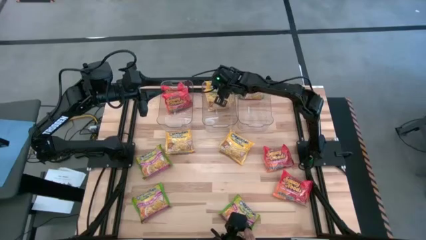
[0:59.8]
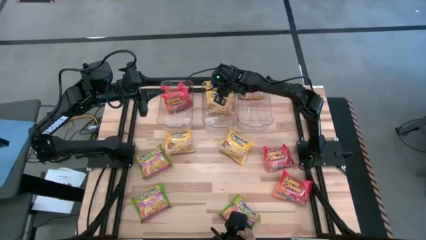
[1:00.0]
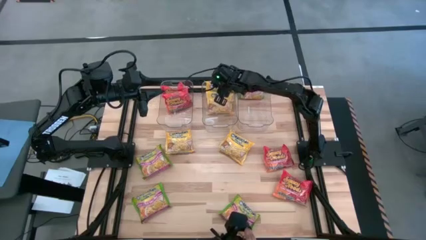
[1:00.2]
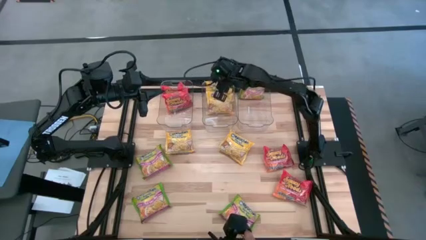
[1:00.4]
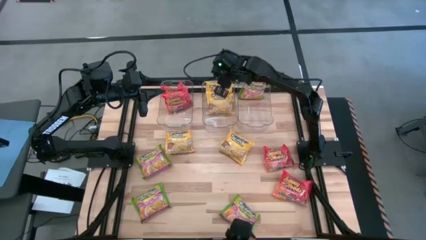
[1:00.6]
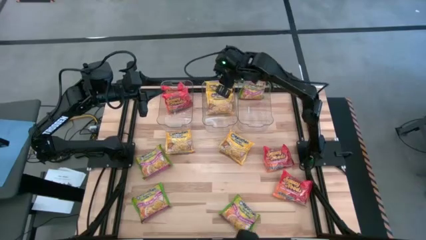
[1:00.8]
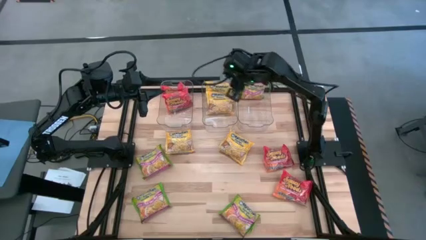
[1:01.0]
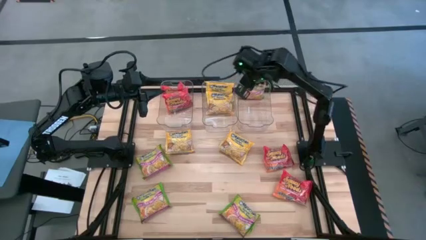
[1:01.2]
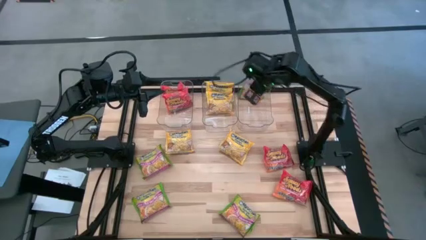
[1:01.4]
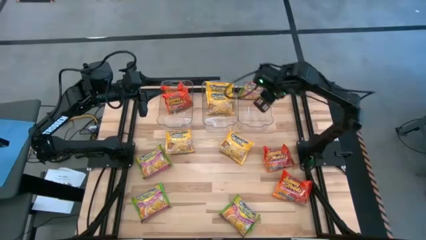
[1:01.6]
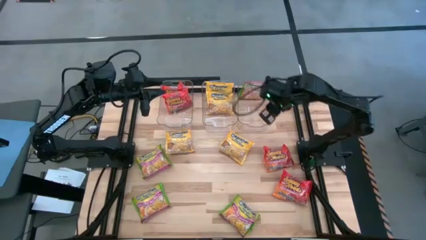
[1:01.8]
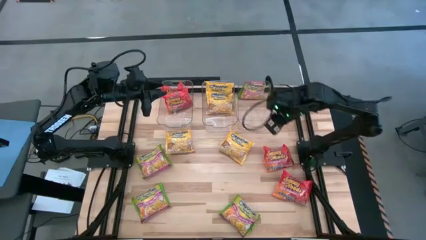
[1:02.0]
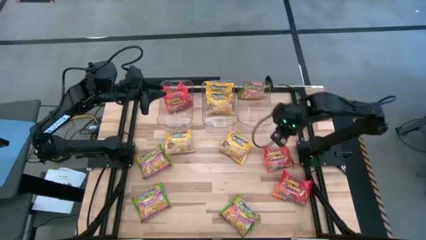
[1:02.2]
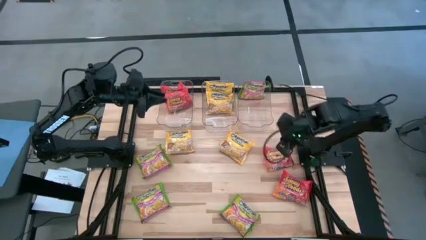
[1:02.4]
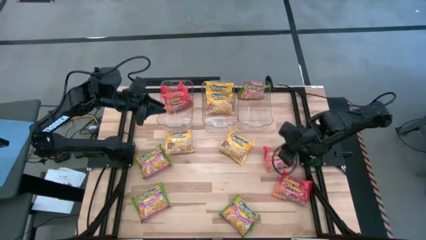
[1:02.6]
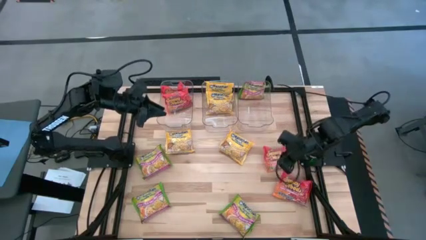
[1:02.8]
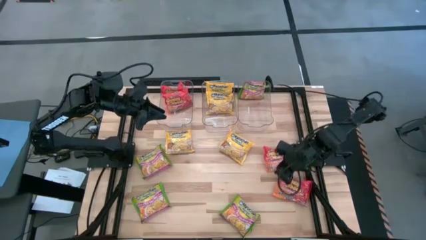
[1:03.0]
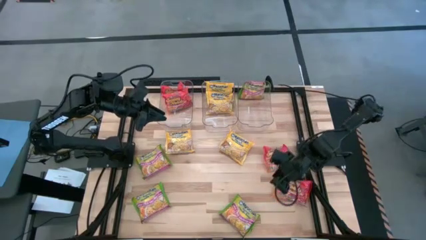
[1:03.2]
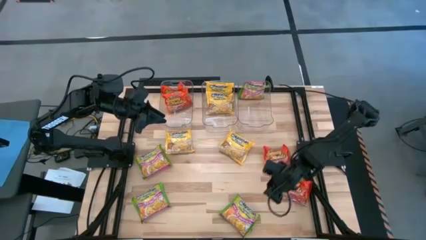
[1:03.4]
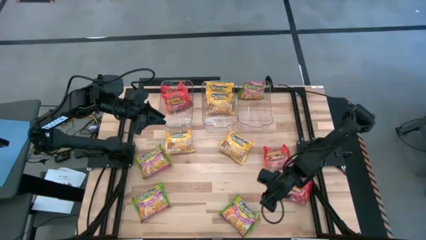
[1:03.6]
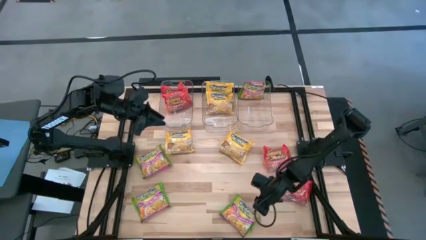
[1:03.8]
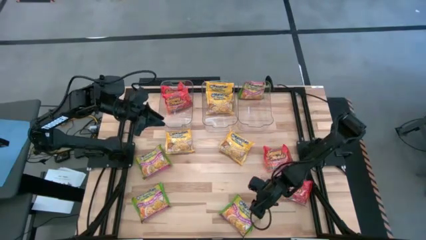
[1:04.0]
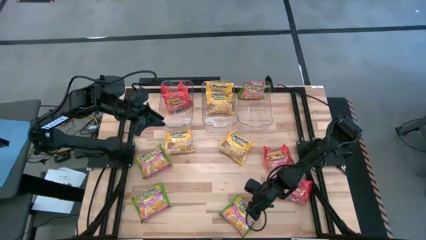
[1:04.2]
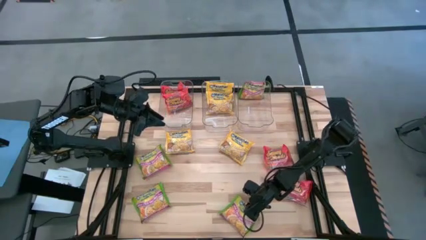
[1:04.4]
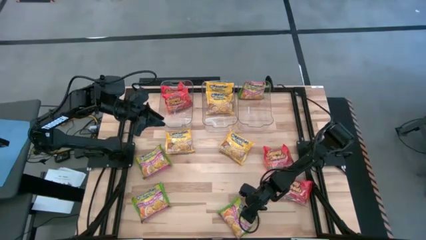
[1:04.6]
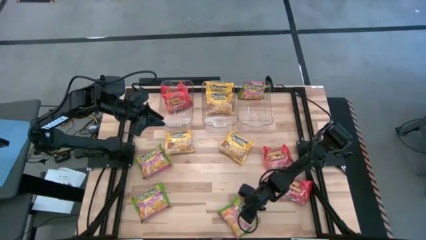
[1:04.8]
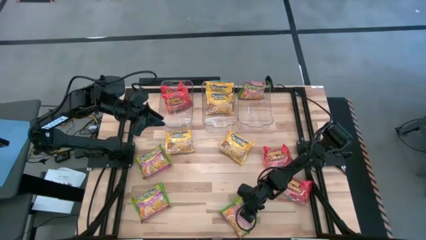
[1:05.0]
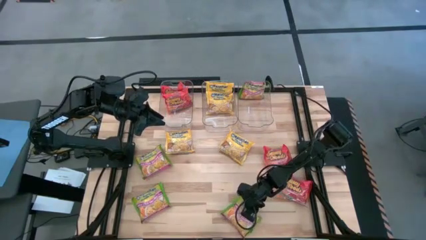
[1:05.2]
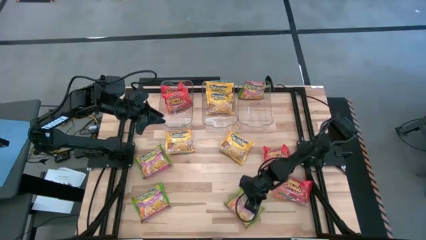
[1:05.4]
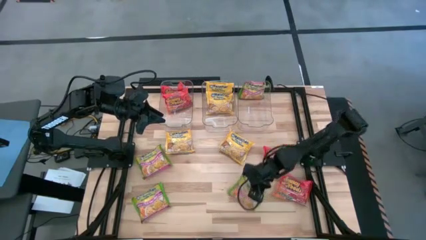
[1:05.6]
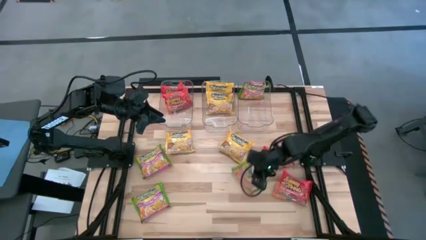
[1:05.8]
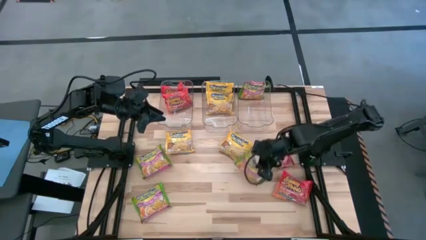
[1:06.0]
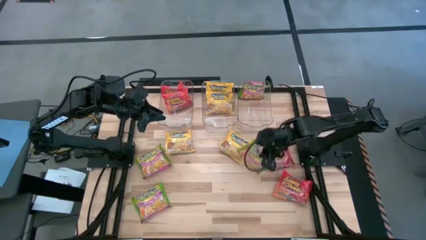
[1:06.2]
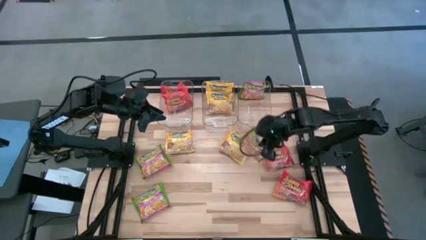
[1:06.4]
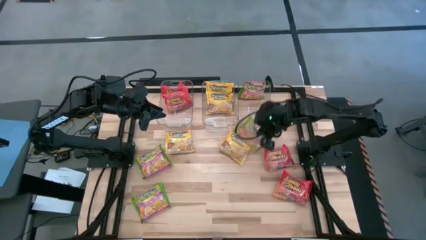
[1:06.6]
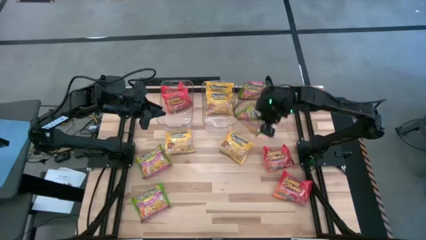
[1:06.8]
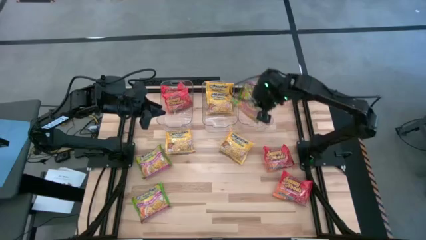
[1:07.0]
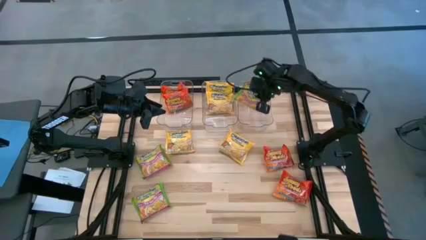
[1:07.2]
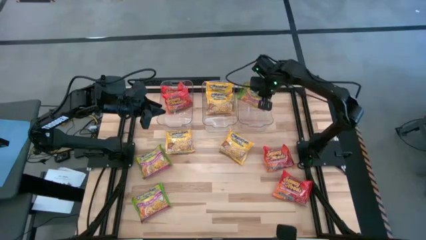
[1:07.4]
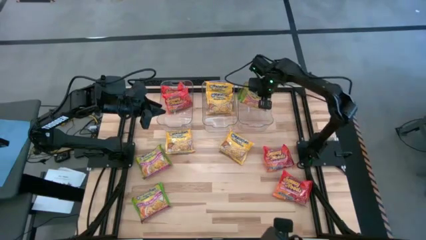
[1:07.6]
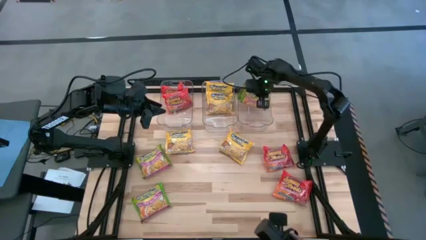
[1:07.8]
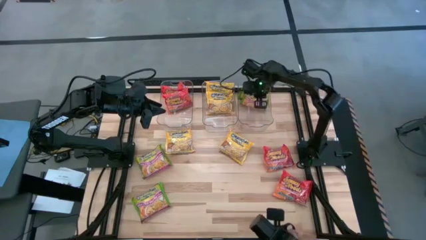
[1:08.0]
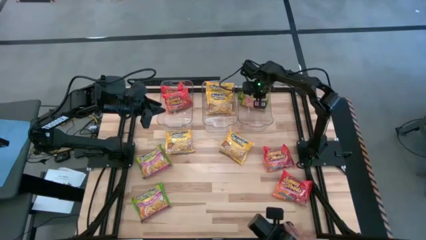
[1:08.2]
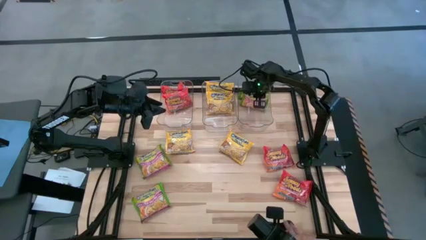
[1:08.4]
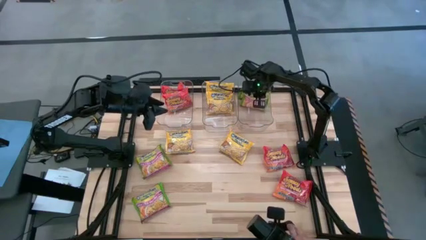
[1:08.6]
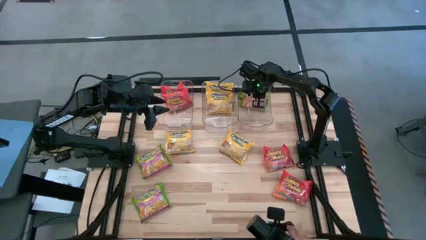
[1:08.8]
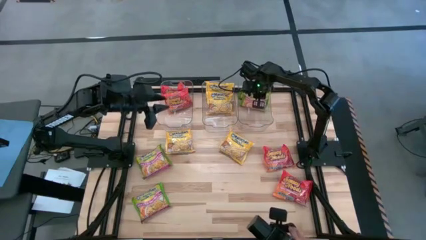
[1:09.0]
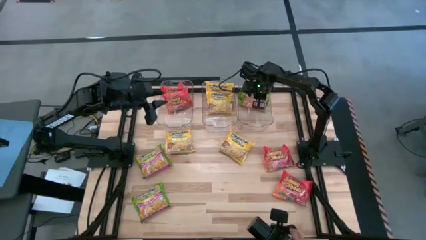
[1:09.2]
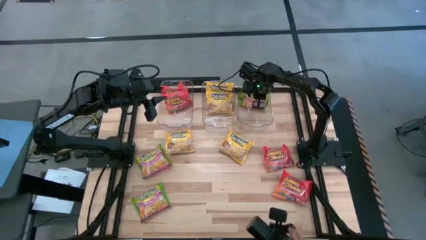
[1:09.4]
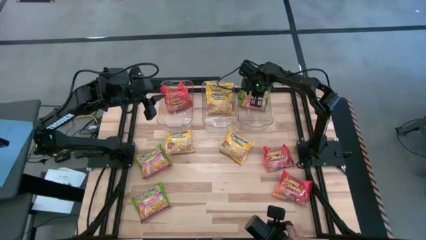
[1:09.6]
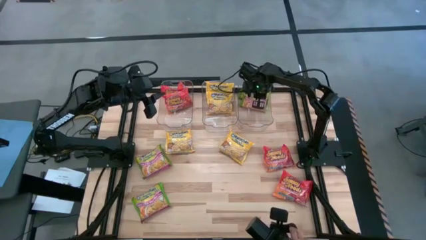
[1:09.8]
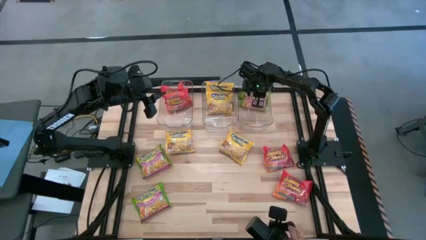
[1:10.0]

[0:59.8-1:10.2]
Task: Sort Maruchan noodles
Put the green noodle pack into the right transparent bin

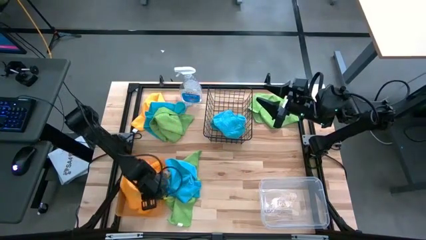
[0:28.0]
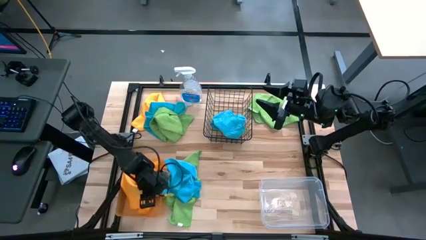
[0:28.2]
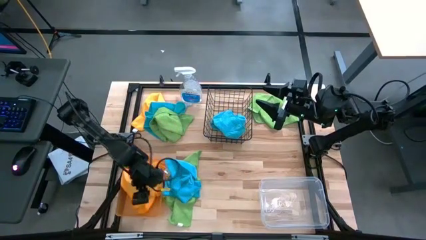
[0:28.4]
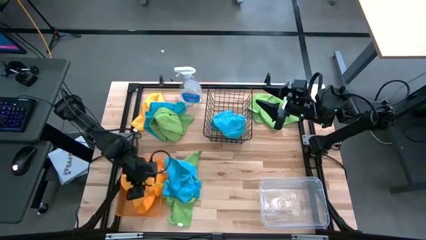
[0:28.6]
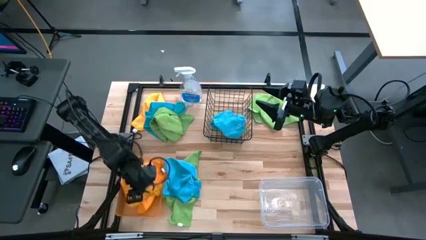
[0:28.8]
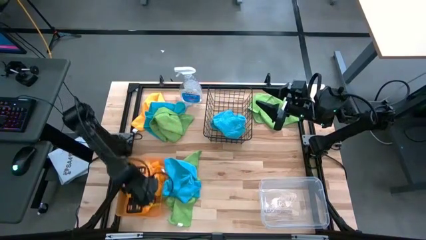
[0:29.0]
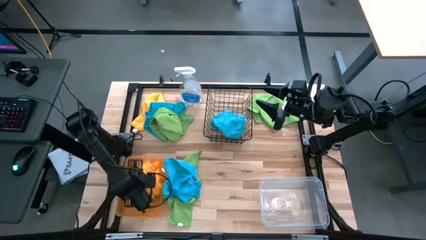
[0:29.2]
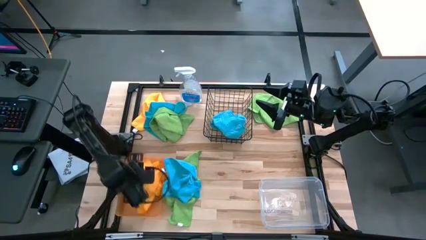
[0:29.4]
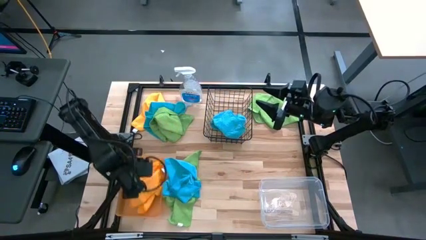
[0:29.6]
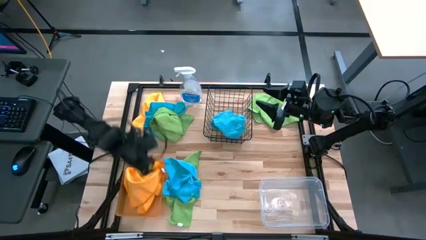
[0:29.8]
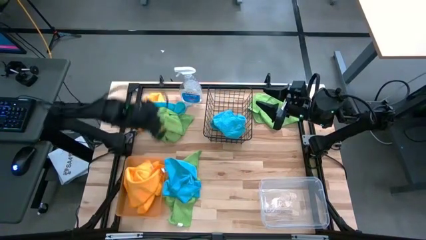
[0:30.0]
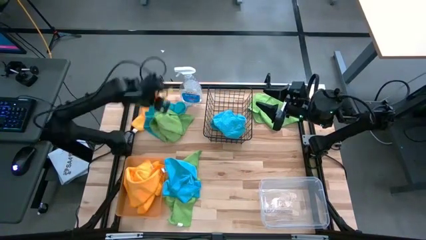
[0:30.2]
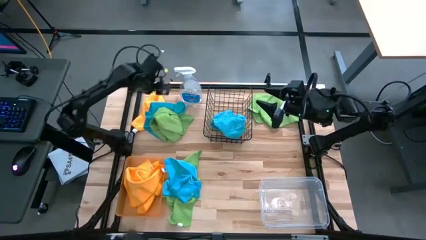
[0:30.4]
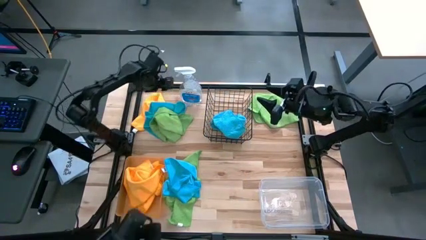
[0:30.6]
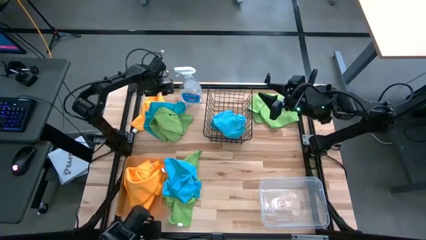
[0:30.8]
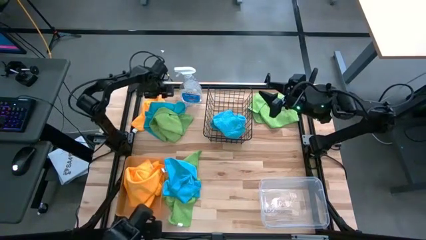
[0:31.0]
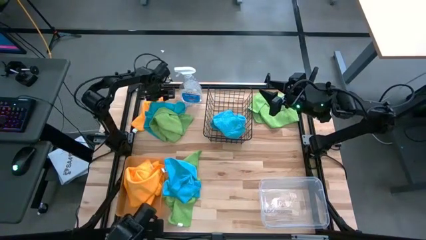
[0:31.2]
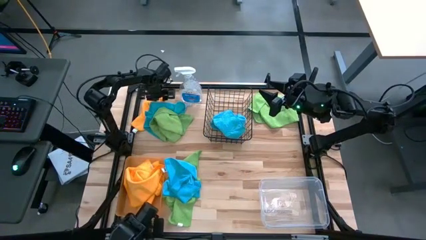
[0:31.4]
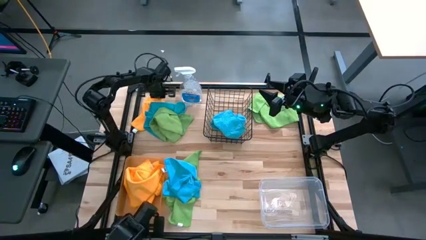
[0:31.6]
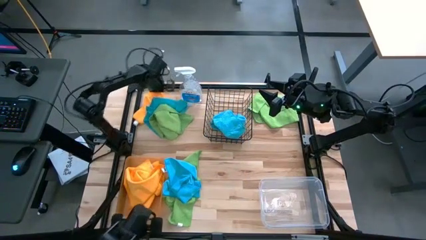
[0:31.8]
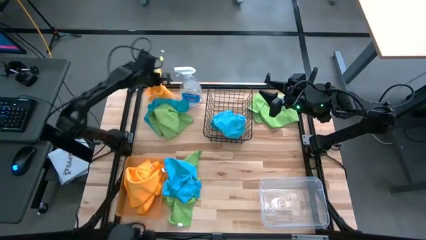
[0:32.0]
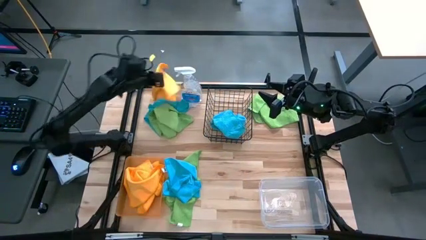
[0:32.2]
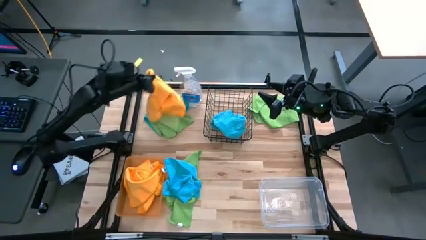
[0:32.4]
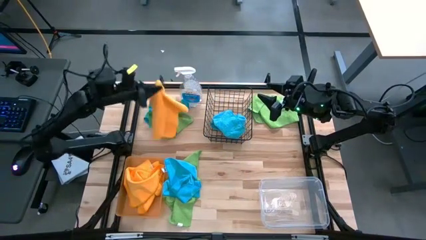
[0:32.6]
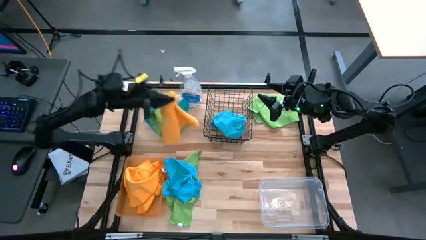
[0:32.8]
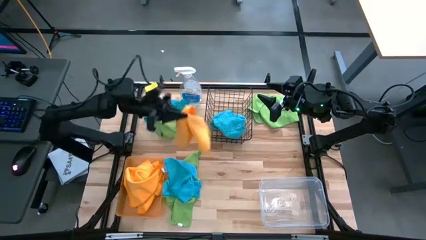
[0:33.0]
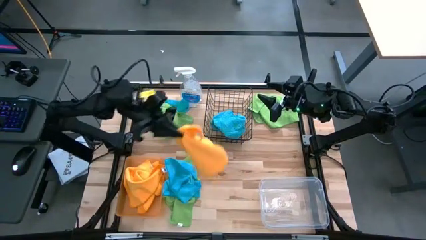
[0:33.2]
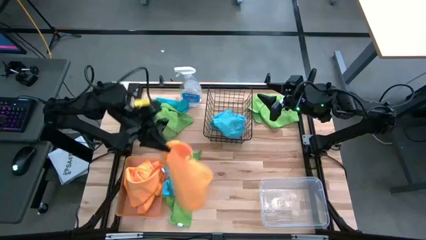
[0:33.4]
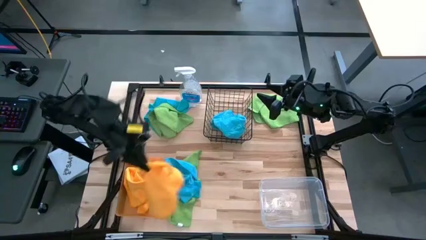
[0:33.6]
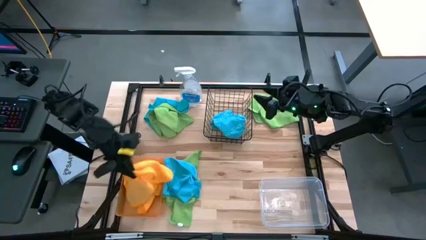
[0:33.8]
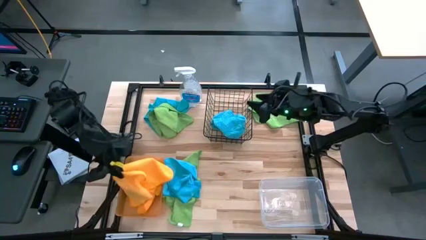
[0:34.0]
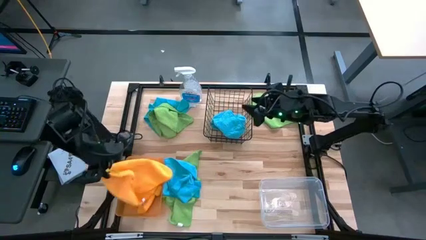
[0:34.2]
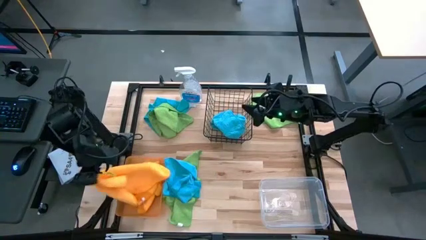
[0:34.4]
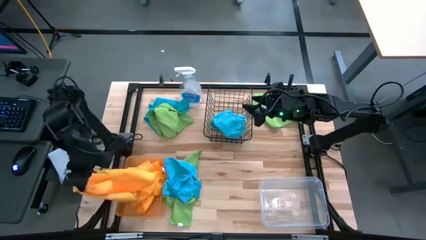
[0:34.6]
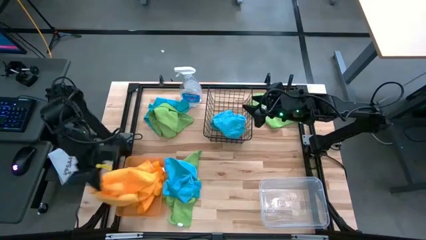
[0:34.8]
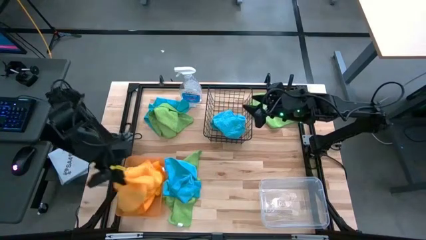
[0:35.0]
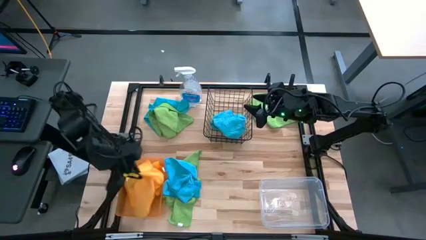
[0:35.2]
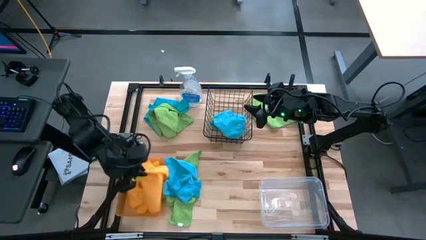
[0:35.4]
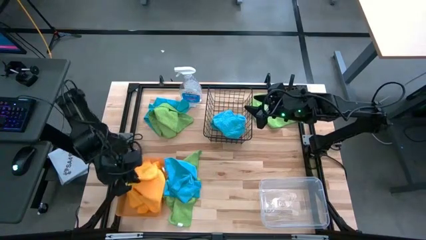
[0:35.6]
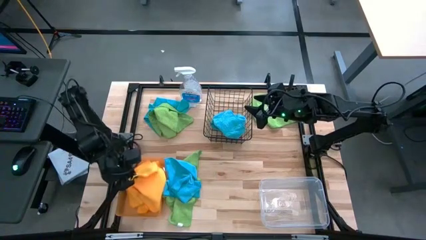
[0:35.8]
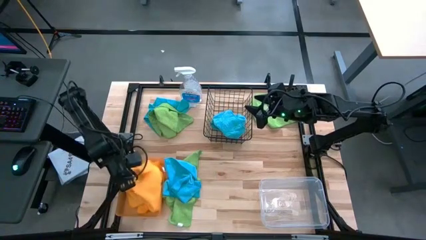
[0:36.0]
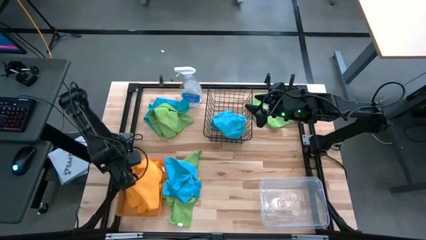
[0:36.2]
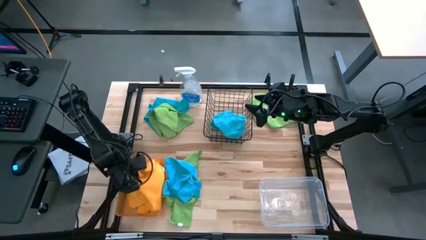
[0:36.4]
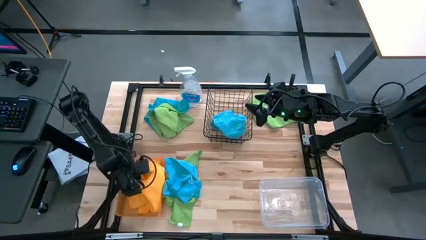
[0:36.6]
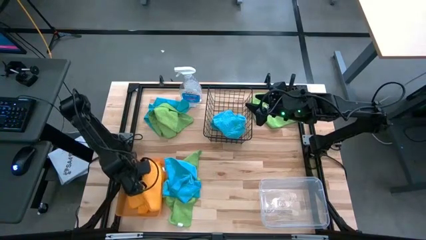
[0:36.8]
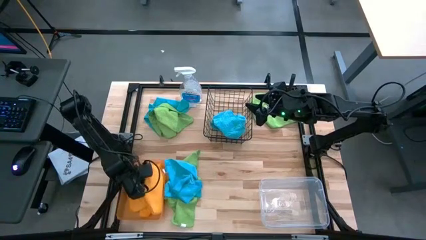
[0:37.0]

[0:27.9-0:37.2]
Task: Sort microfiber towel by color & place in baskets
Put the orange towel into the orange bin
